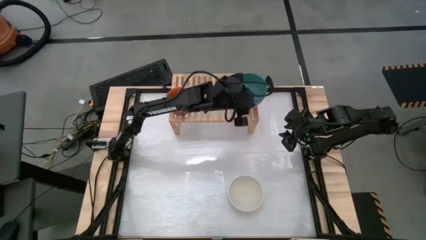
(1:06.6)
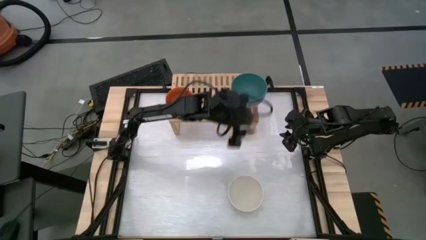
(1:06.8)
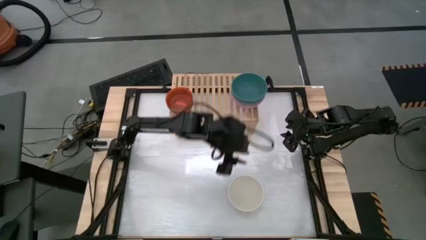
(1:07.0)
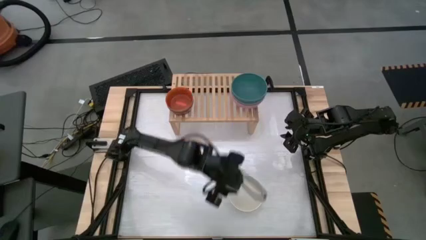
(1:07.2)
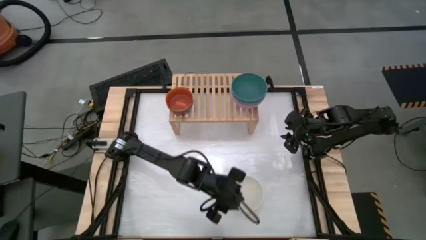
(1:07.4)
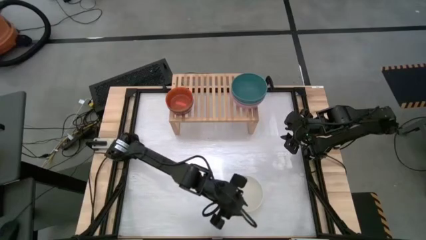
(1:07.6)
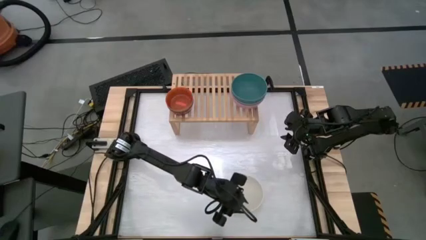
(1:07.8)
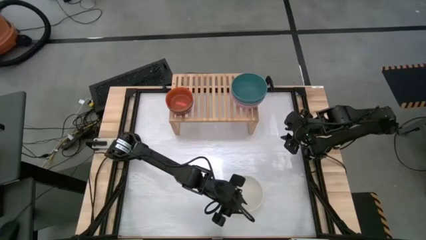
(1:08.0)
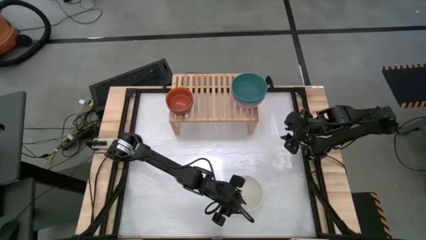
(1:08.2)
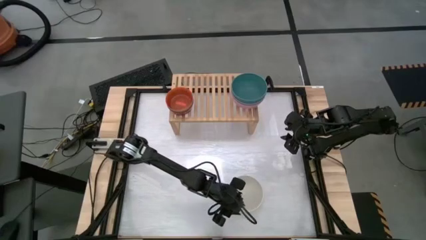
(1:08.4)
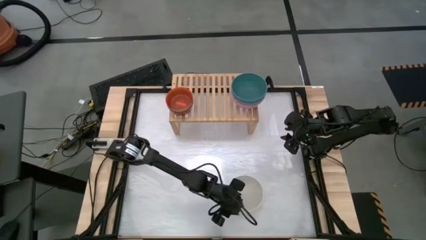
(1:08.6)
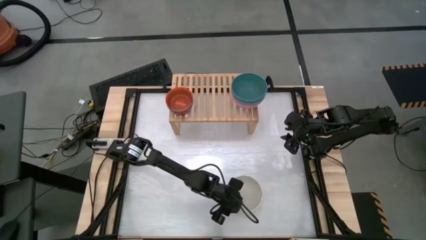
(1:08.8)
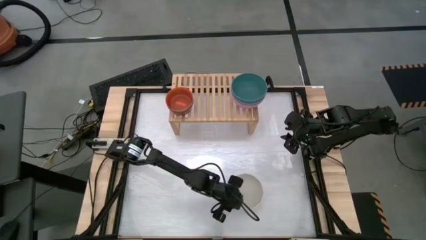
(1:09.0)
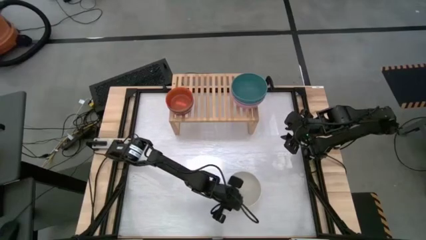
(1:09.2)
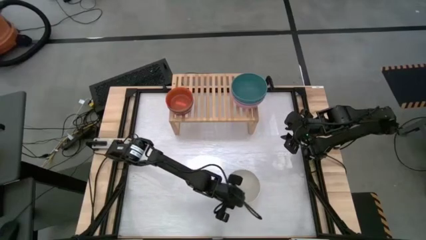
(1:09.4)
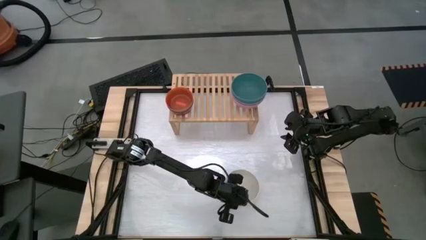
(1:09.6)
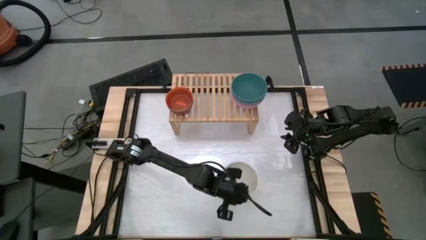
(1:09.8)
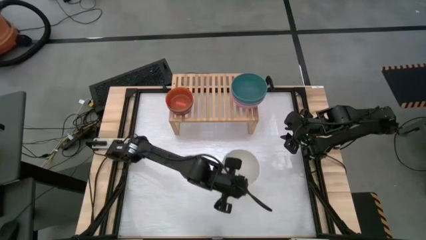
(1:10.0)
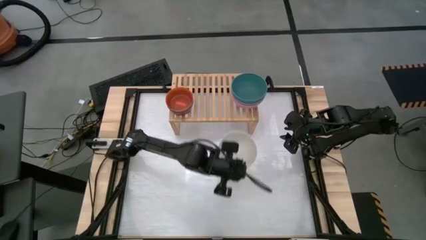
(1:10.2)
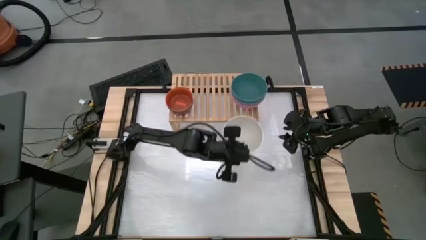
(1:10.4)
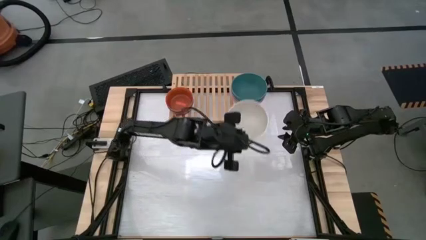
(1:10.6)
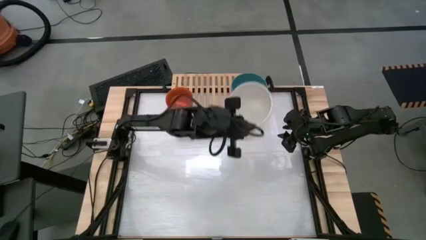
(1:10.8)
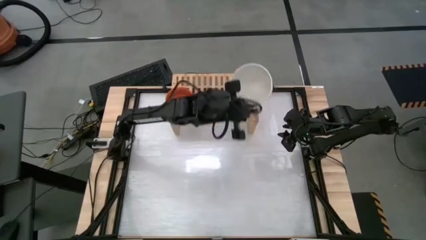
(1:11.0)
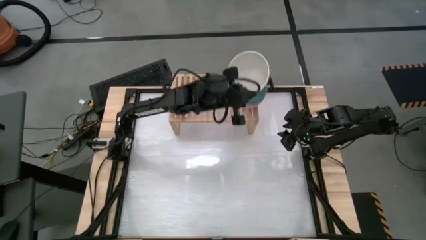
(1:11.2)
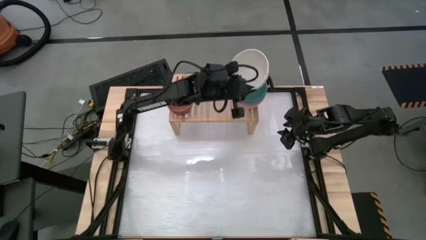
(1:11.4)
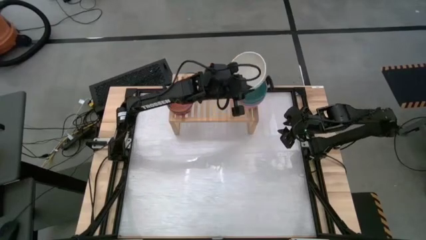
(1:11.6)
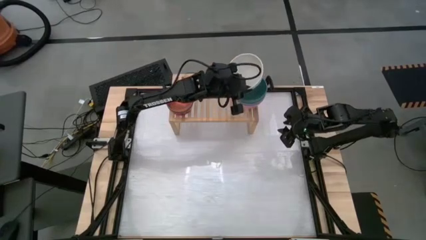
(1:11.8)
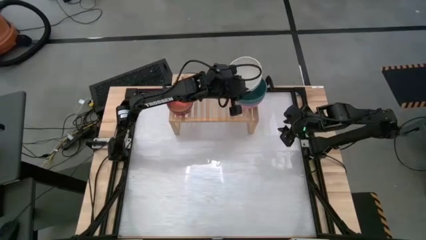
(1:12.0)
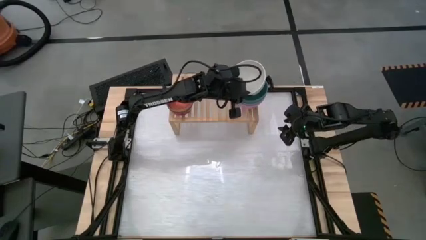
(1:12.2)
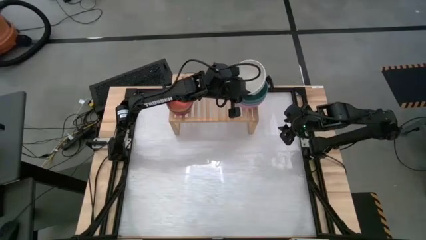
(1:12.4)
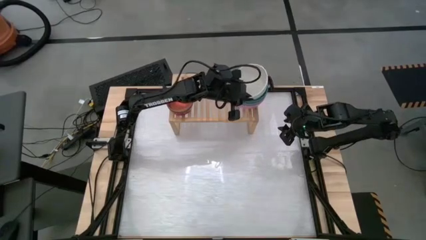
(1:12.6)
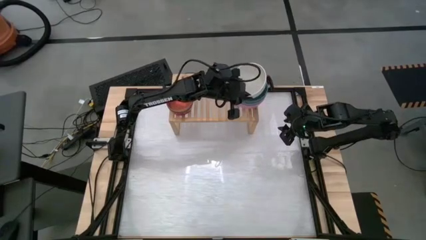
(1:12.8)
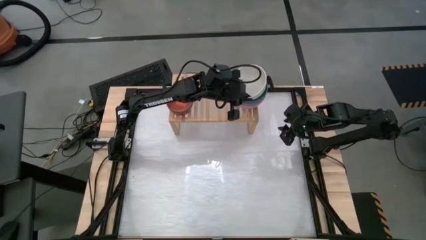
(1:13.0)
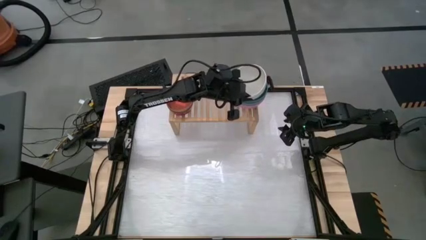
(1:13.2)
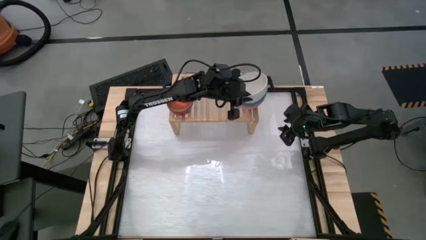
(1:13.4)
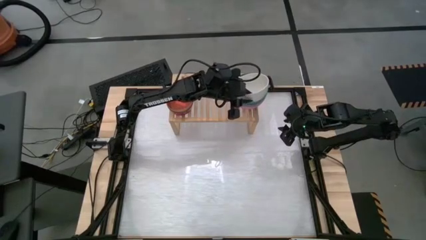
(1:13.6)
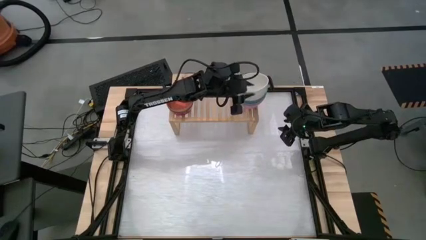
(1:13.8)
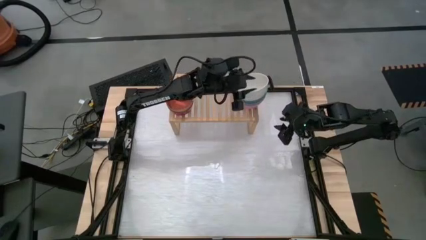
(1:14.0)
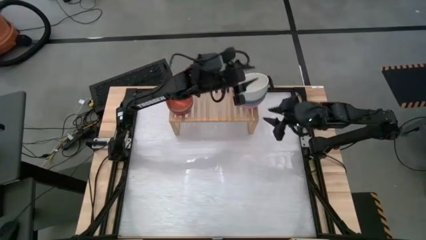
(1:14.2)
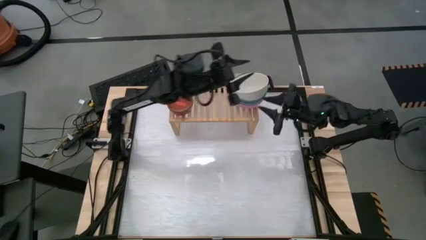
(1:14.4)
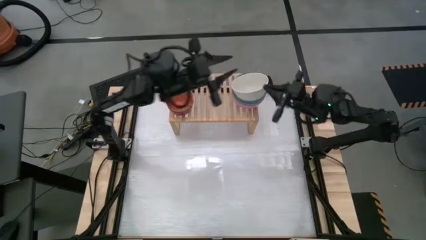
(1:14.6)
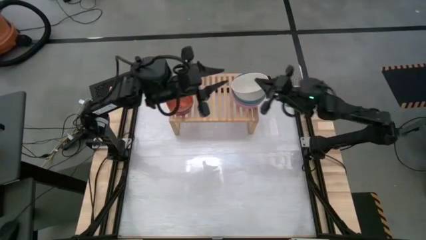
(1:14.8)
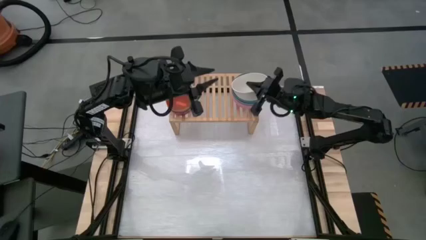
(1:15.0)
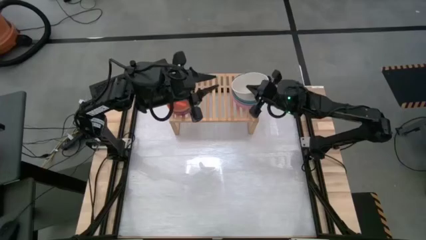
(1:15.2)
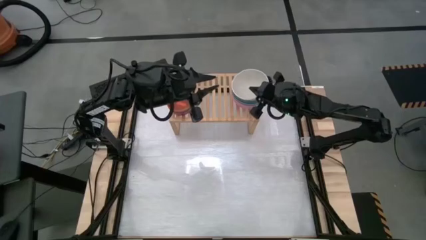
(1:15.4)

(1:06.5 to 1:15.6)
Task: Place and stack bowls onto a shelf
Stack the white bowl on top of the dark green bowl on the shelf

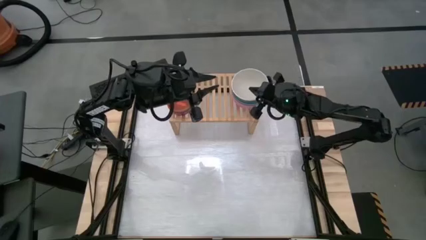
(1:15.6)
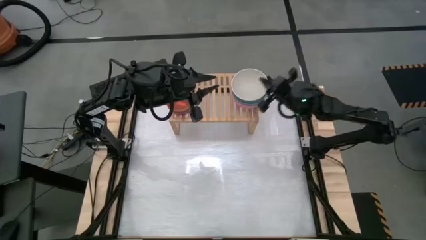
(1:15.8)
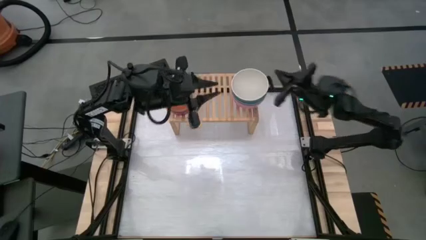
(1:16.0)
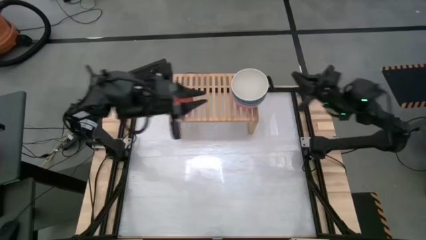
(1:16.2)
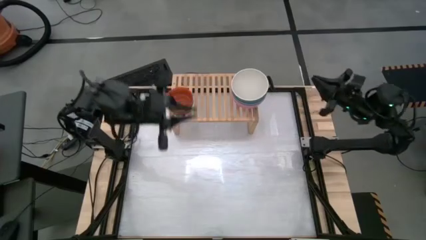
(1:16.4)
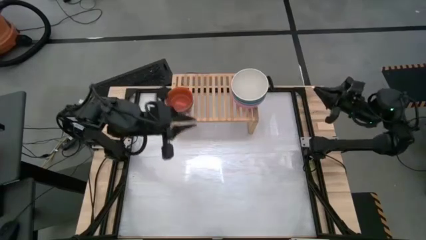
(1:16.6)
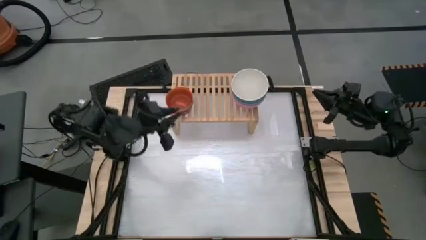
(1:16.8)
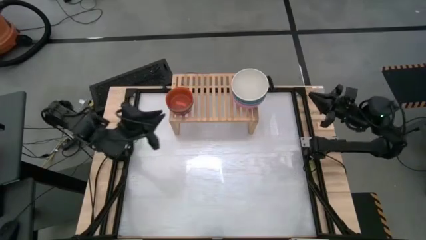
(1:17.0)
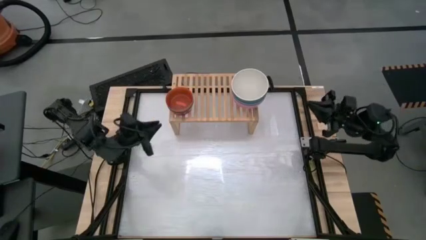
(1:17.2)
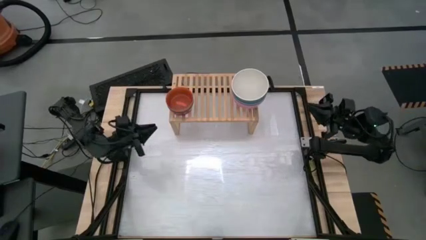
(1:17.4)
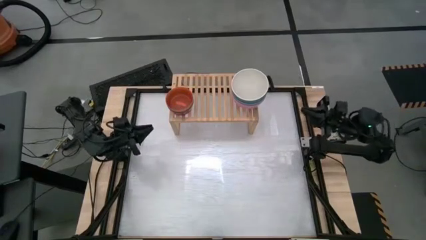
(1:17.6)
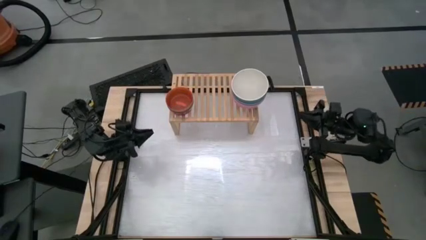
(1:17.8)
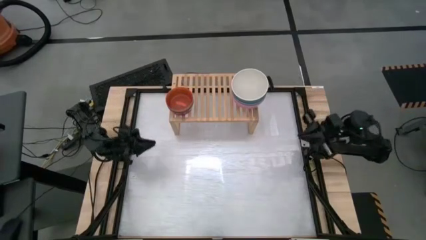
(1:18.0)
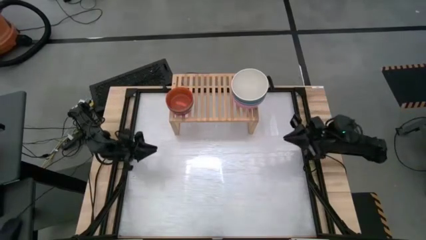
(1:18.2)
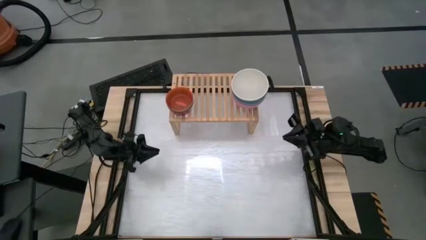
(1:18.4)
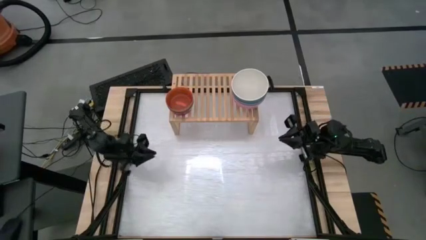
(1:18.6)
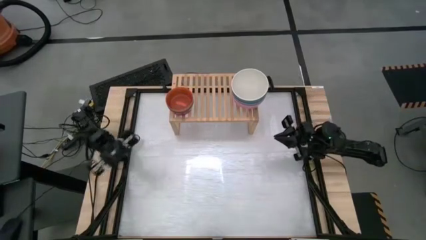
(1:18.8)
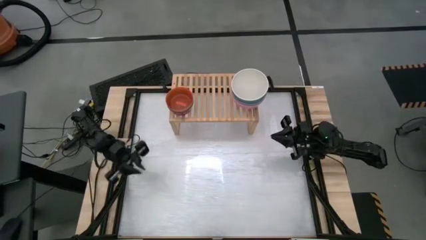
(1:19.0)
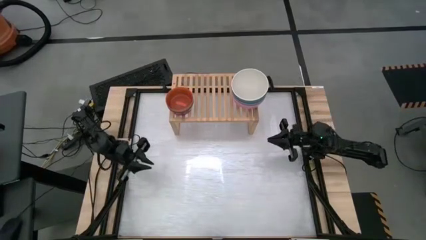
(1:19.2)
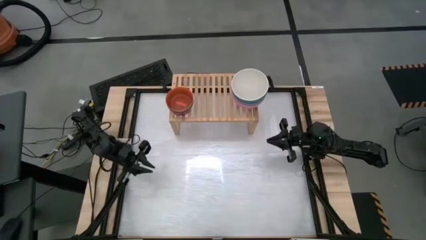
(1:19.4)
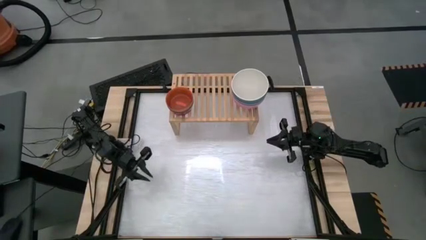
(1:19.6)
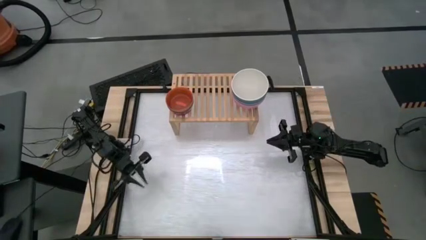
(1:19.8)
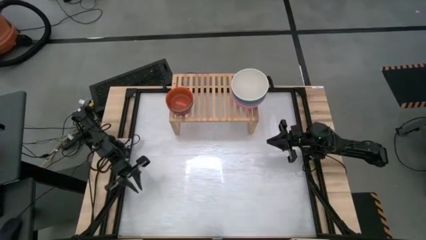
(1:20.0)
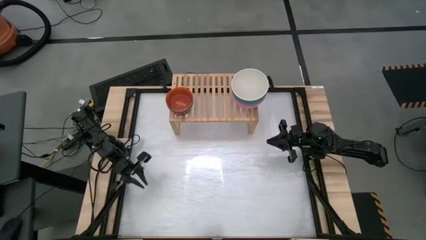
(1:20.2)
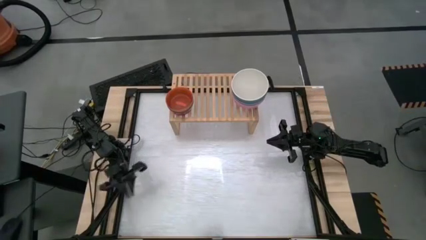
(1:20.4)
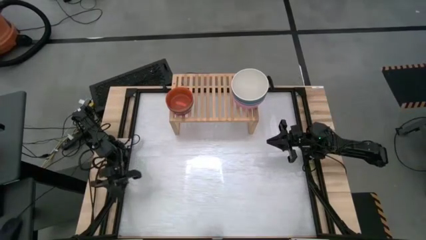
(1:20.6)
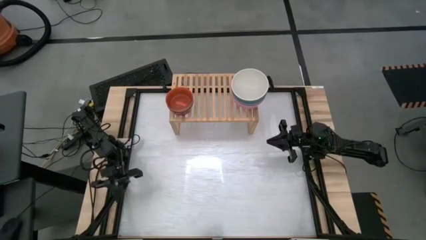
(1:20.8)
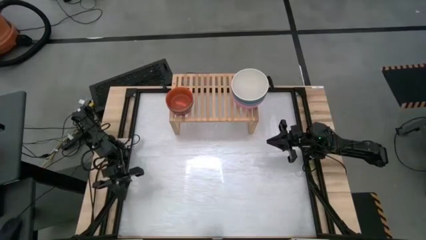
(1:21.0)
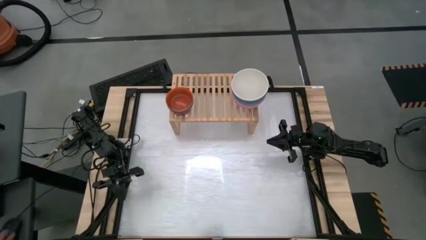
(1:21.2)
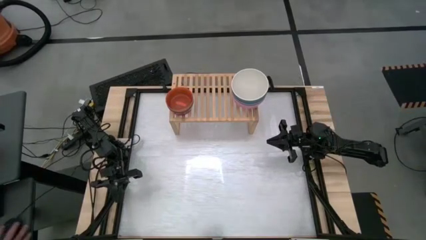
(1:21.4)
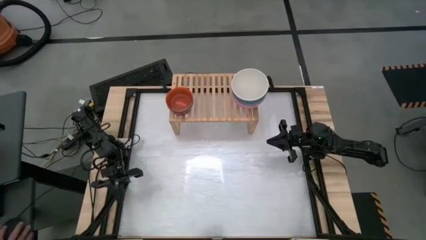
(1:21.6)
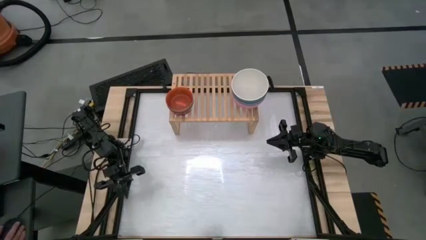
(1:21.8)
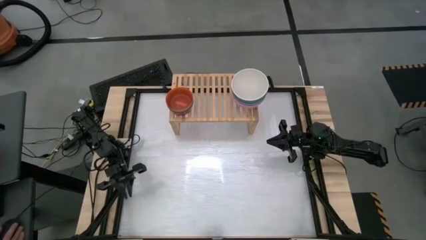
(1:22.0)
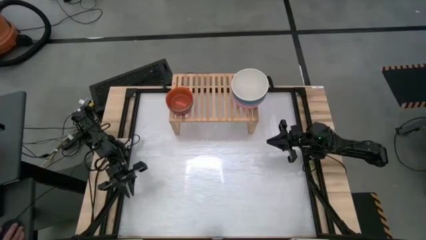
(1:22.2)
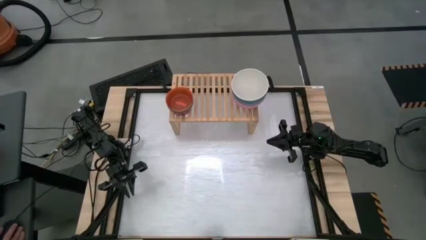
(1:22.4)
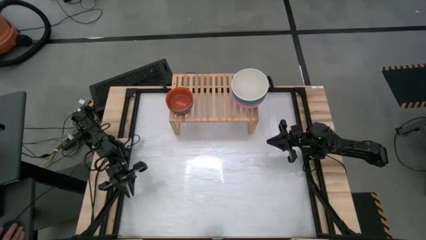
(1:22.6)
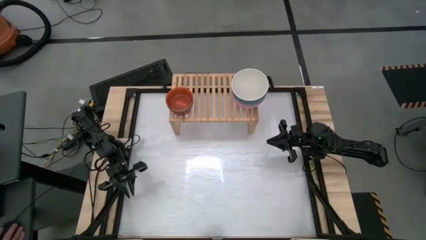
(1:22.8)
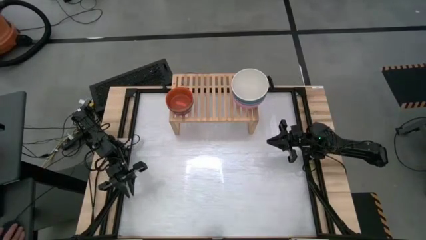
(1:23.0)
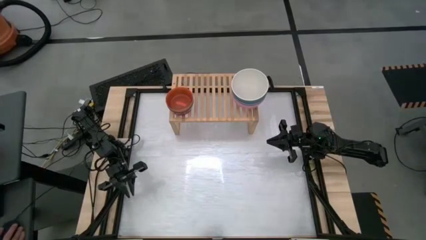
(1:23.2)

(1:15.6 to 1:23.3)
Return to Home Position
